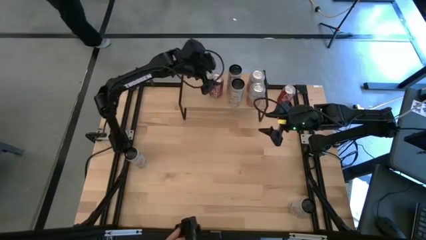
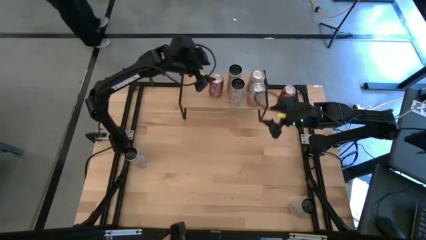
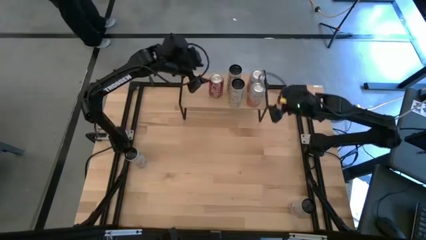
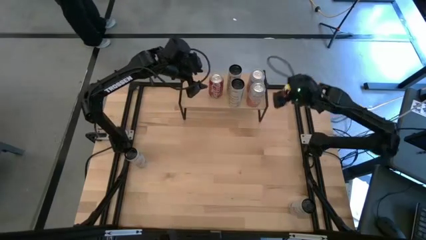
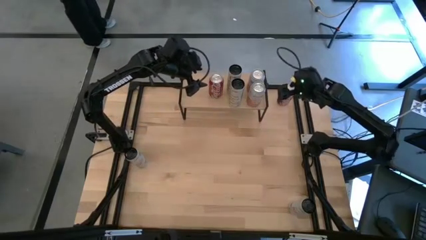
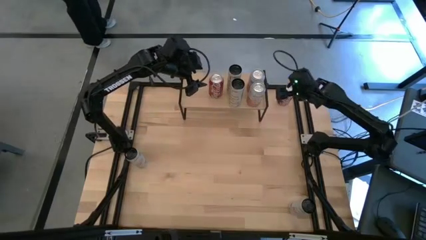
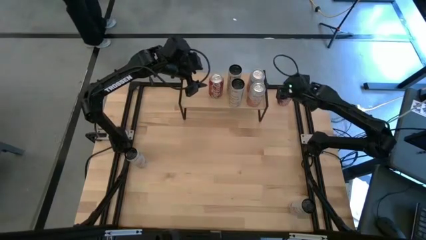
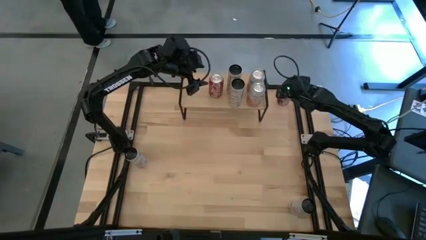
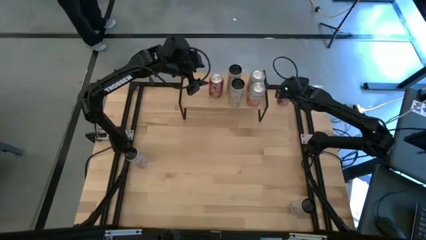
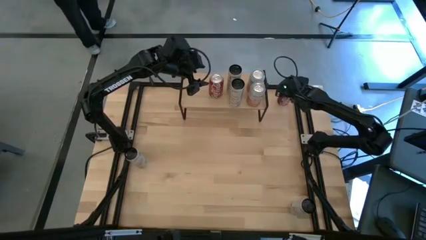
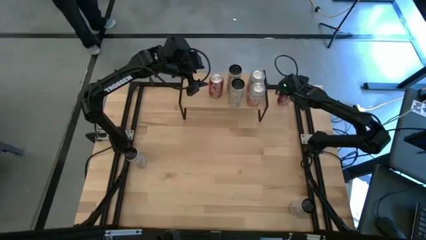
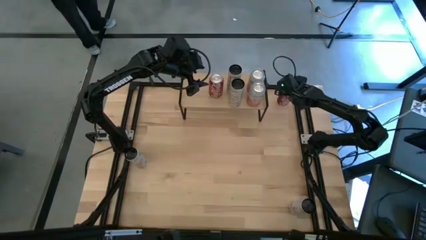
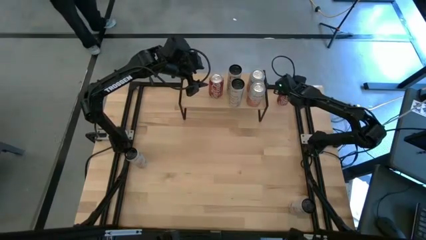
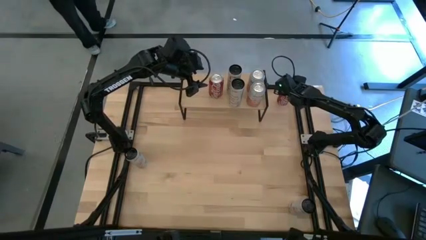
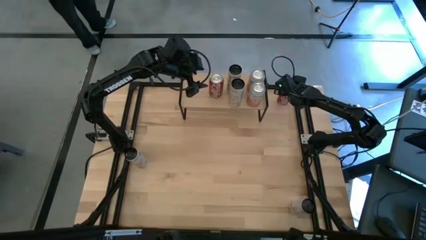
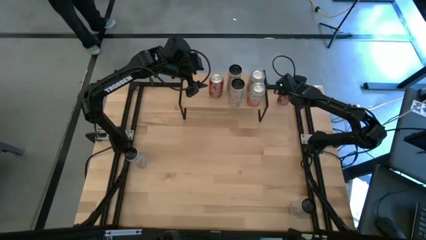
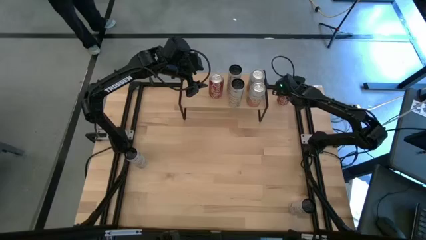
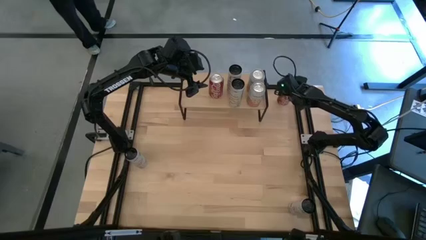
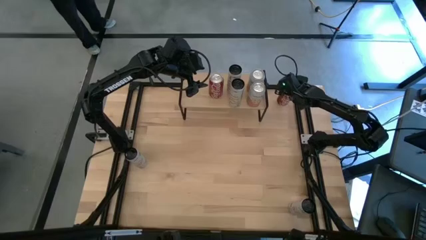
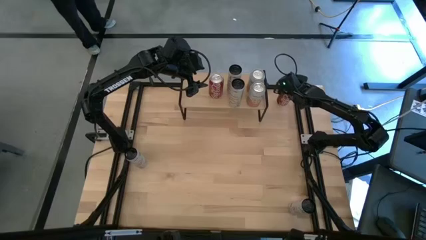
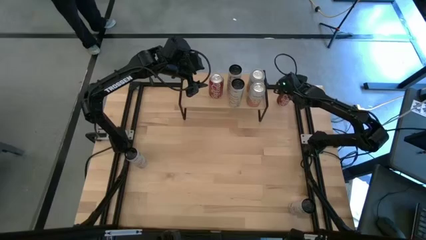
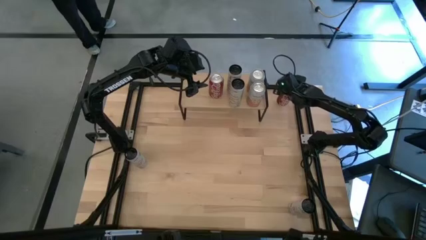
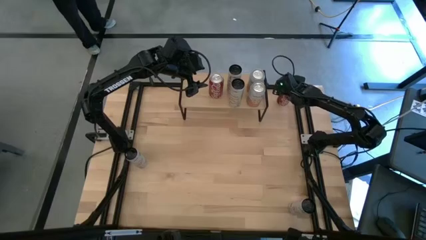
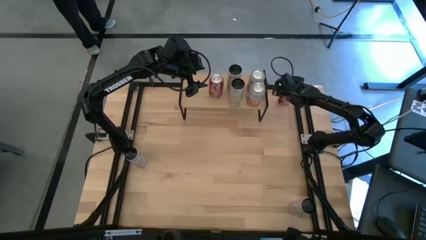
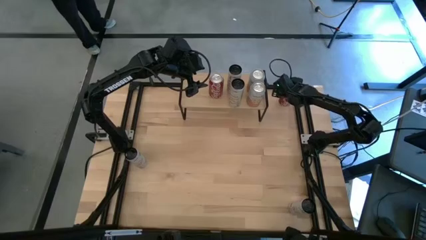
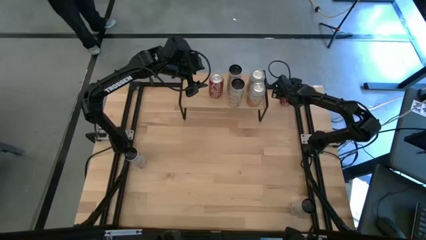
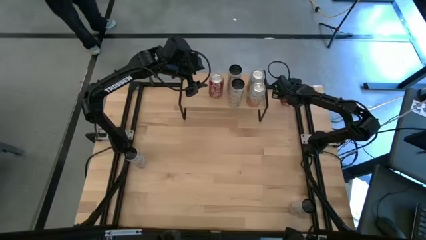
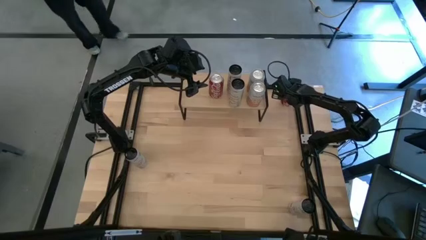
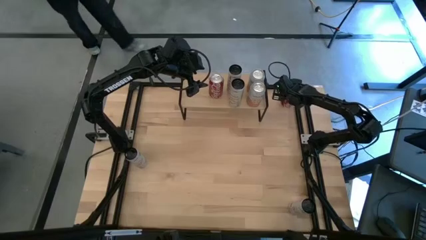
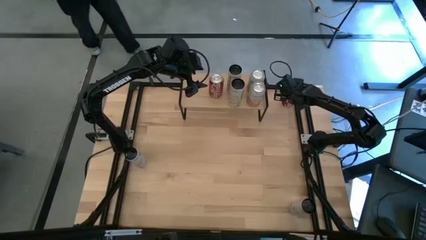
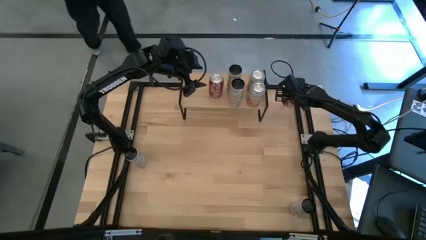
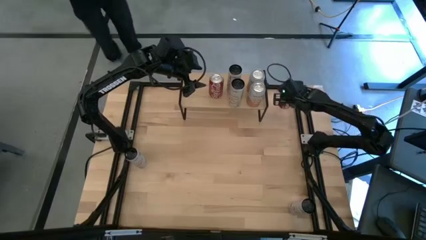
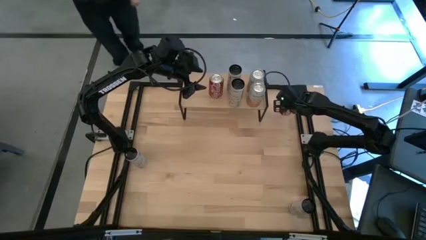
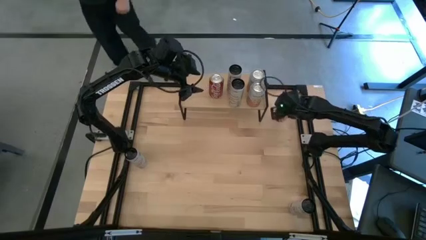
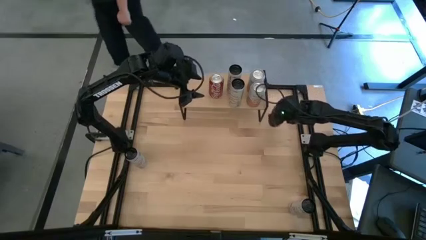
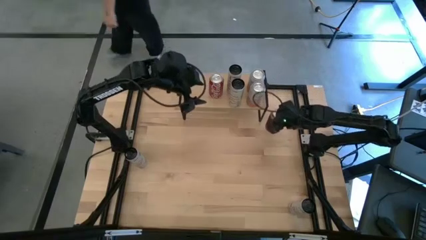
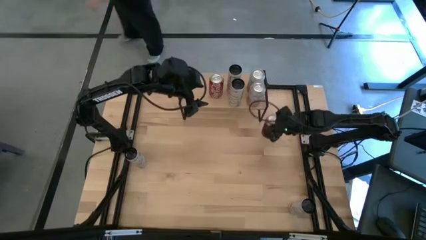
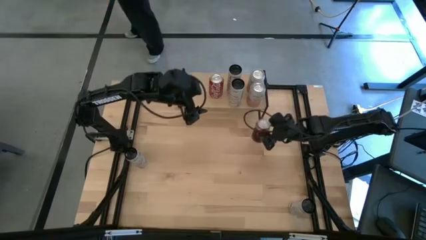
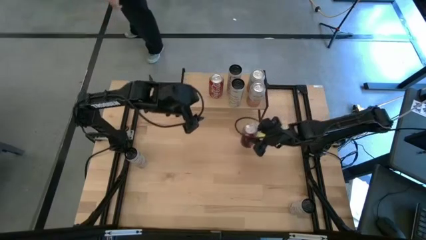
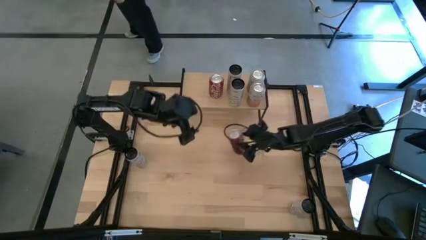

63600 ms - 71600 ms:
Task: Place canned beverage on shelf
Put the red soda can on the shelf aligned with the other red soda can

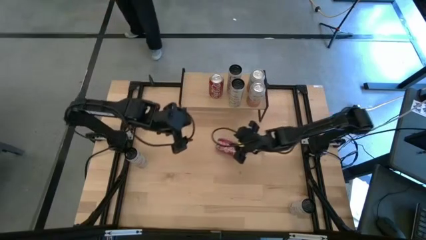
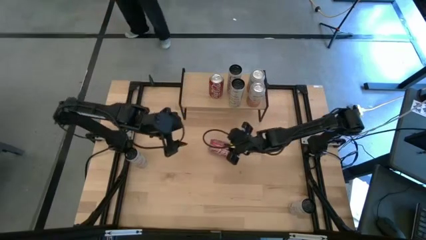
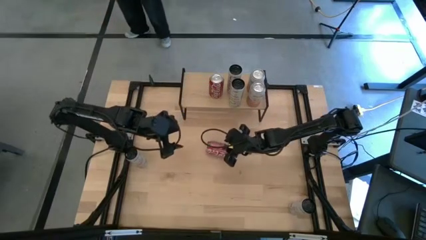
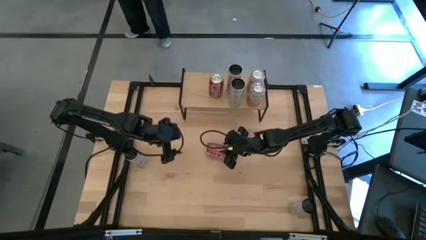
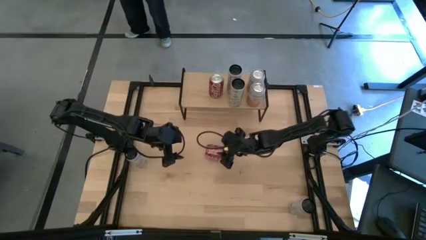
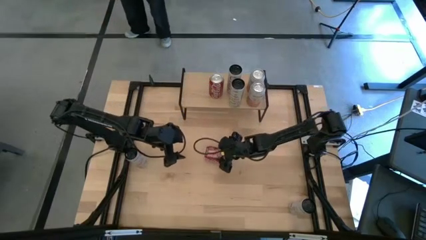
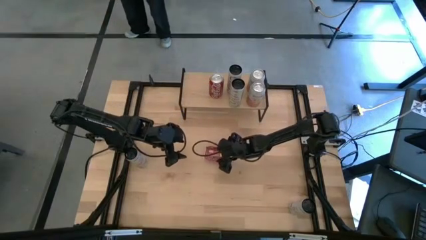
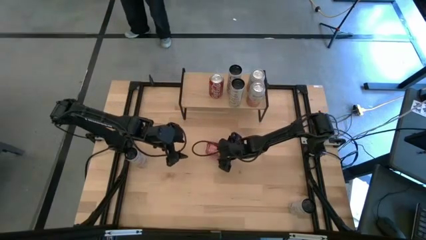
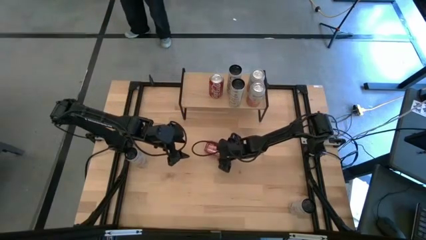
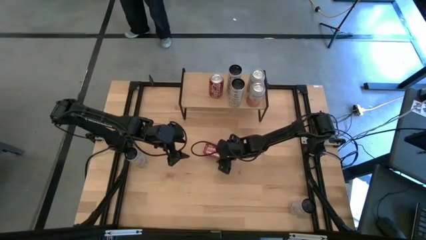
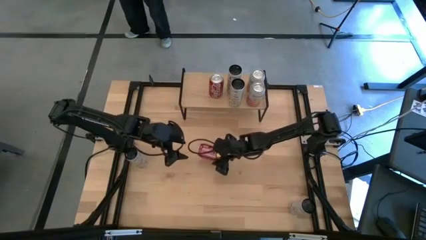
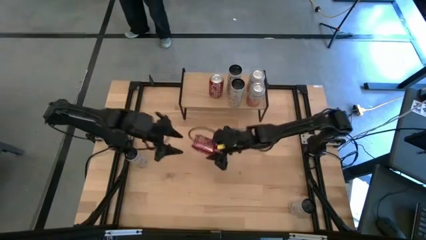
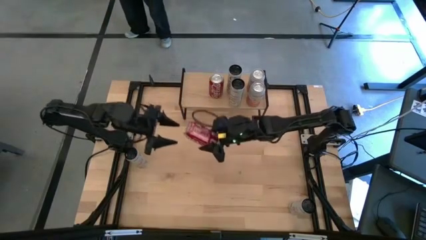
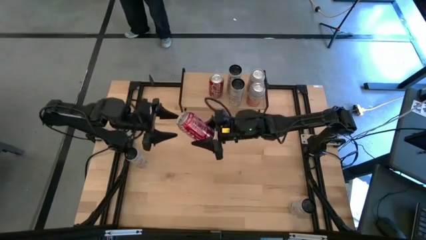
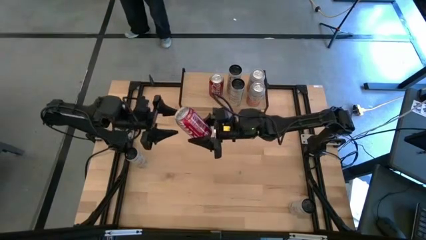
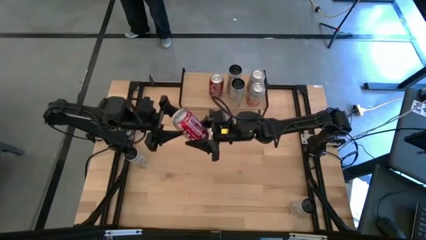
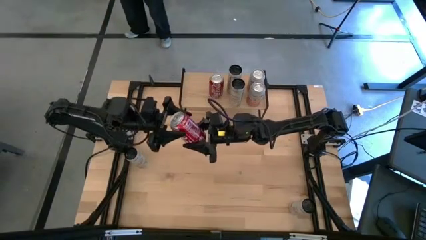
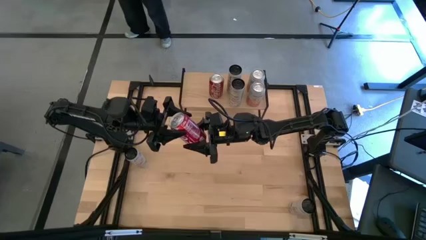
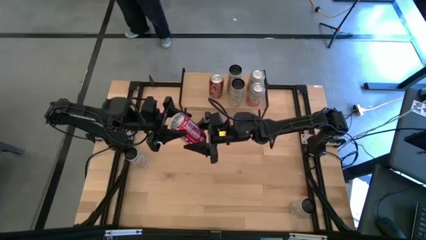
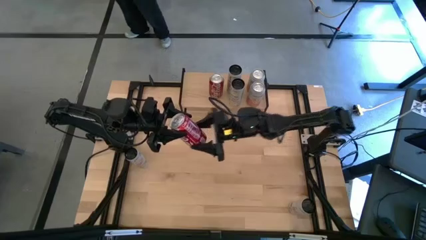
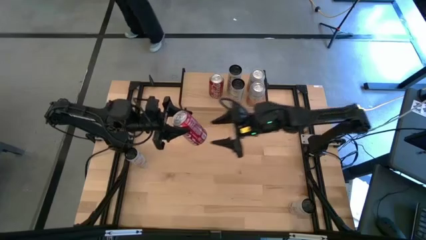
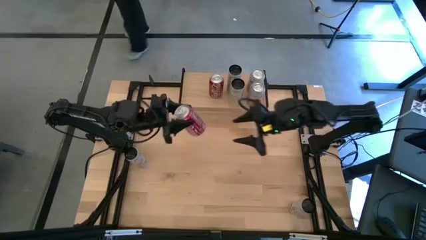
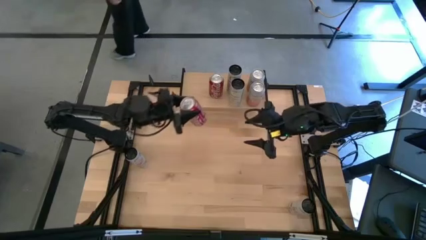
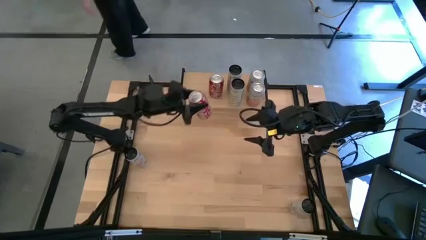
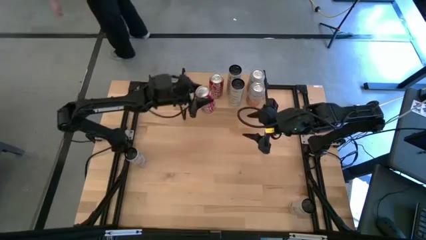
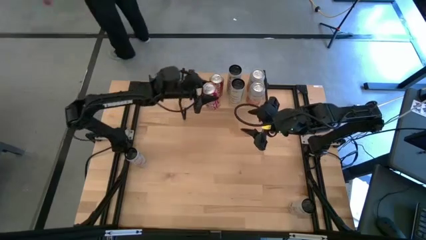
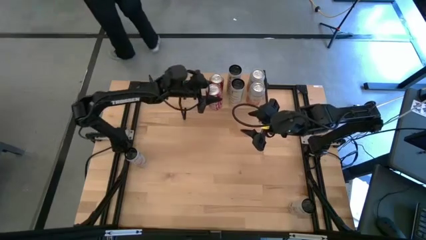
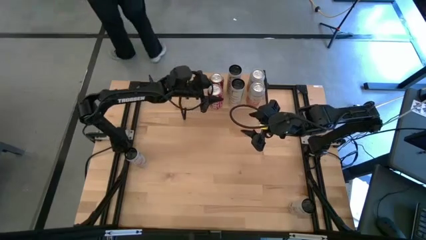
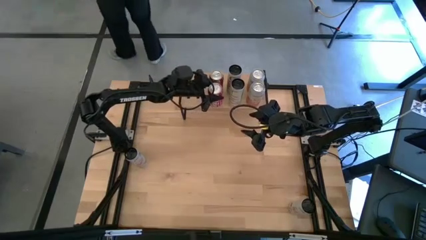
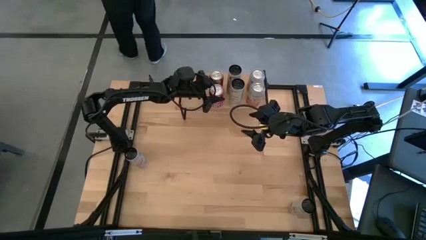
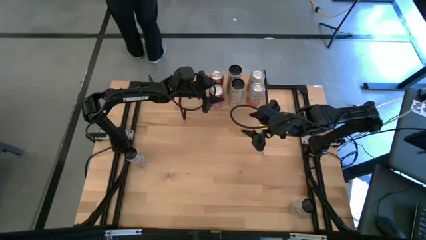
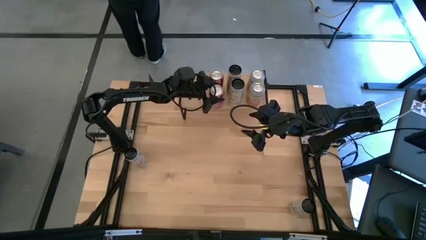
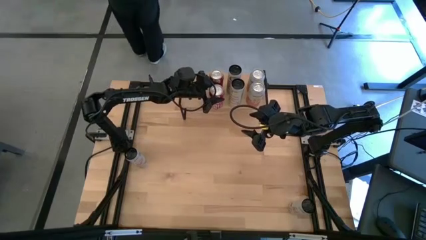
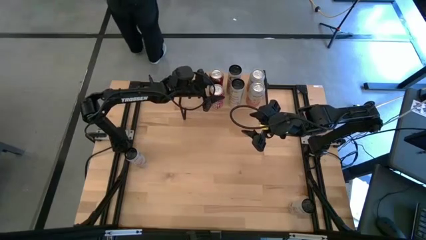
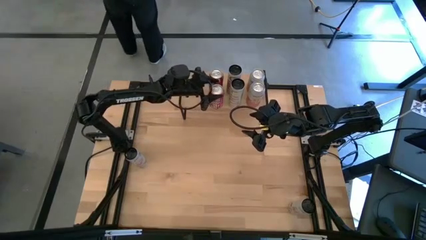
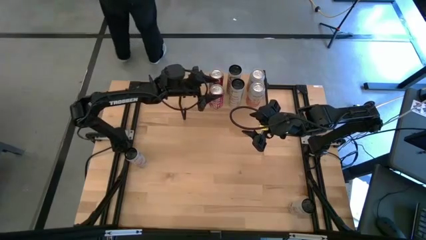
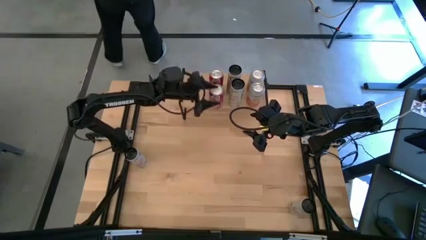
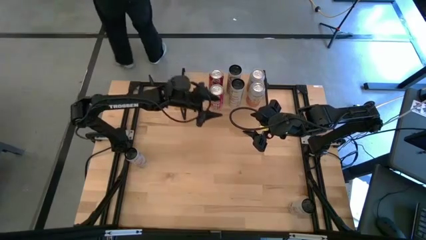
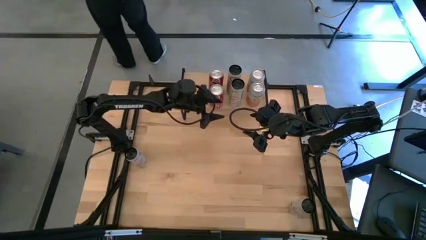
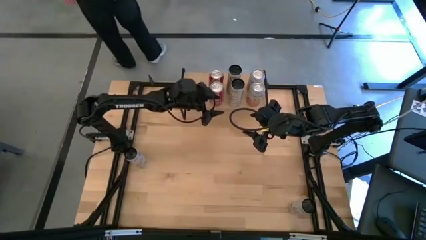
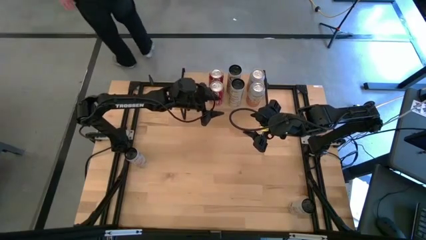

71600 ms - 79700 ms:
Put the red soda can on the shelf aligned with the other red soda can

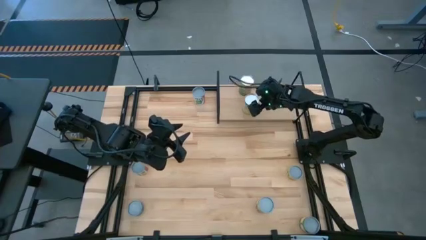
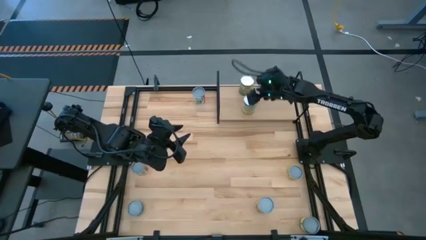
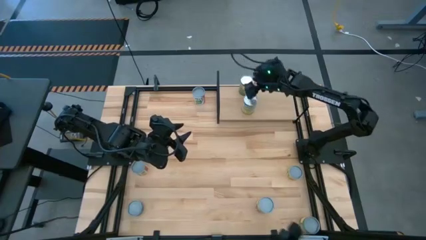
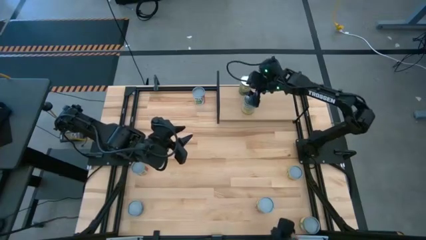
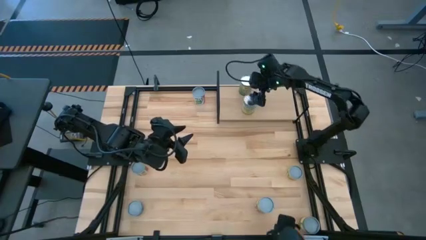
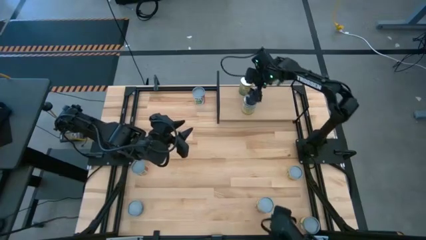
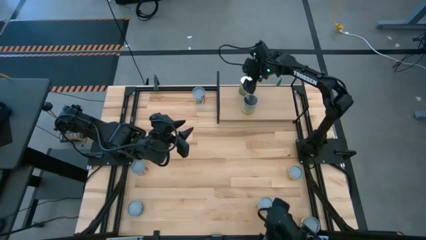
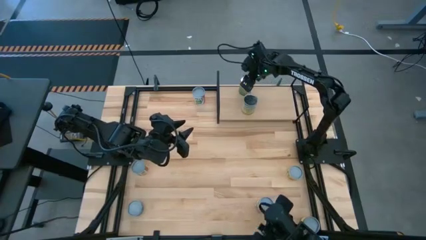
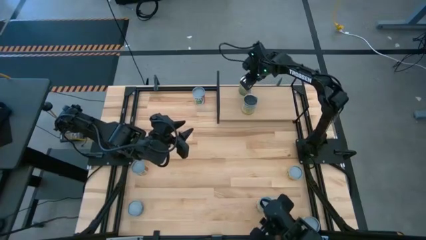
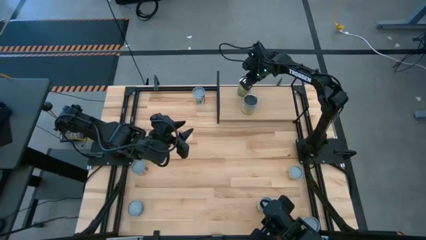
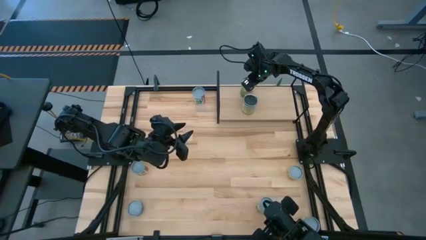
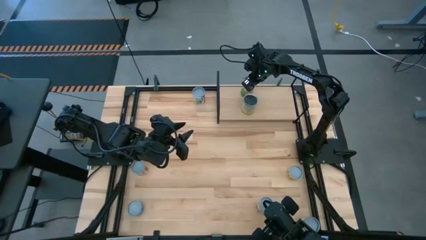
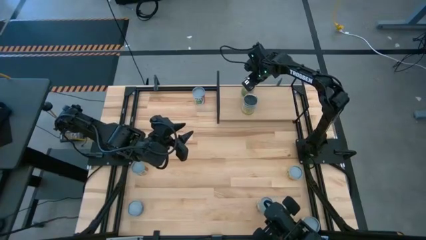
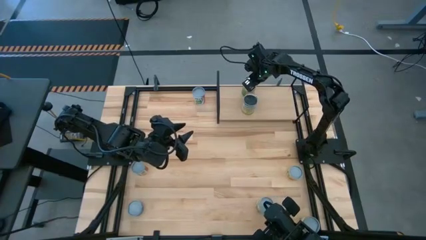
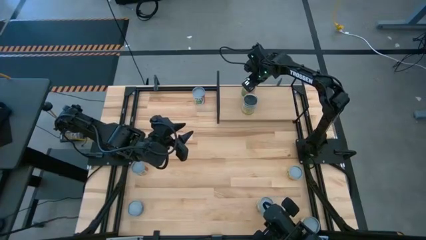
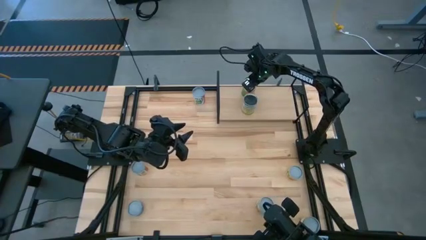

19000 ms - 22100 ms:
Task: Pick and place cans onto a shelf
Adjust the yellow/green can
